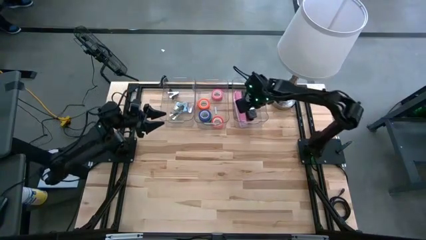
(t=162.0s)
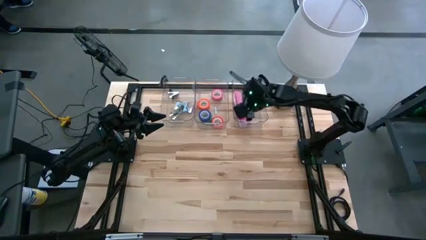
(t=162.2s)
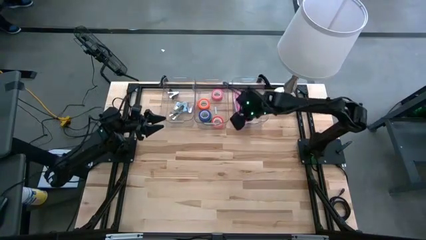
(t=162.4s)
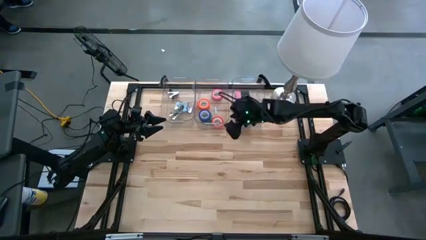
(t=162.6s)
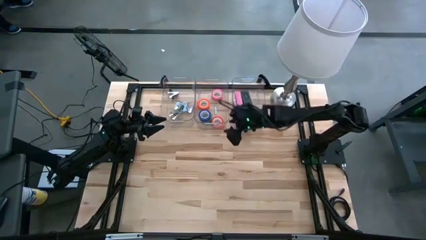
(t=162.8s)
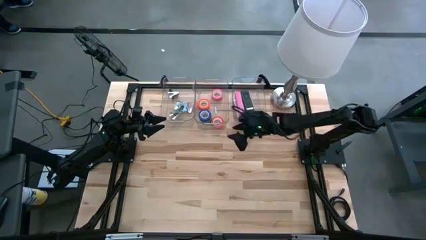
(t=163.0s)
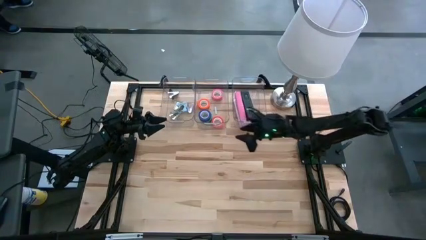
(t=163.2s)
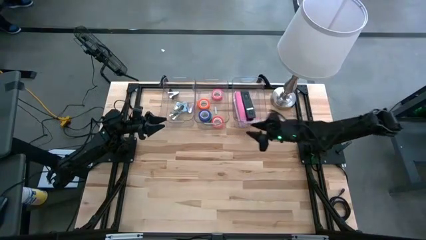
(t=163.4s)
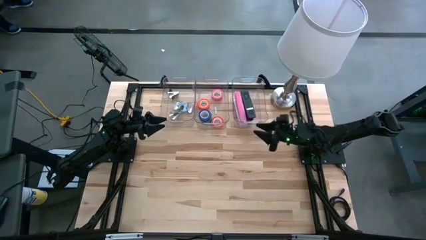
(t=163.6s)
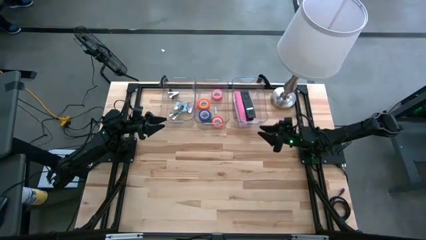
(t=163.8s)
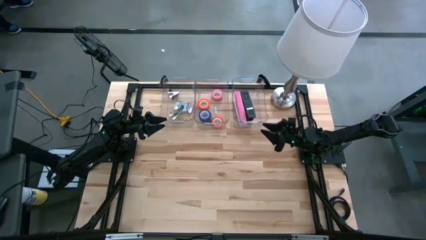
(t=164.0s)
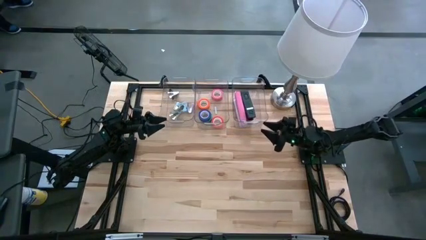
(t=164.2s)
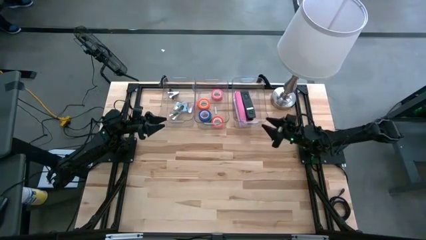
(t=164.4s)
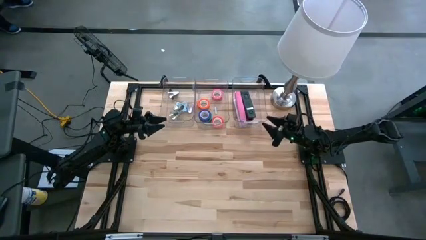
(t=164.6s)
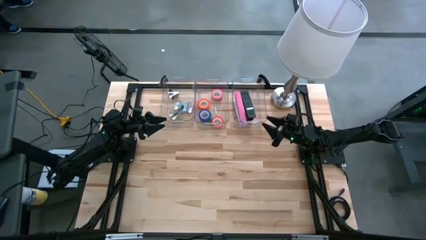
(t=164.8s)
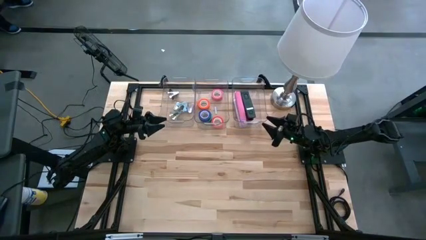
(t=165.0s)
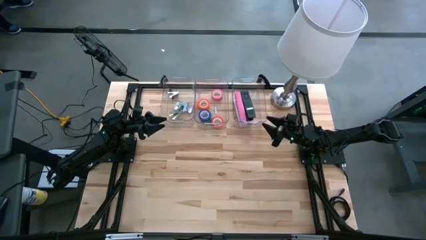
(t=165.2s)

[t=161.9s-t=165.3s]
Task: Pick and place Stapler, Stapler remover, tape
Return to Home Position

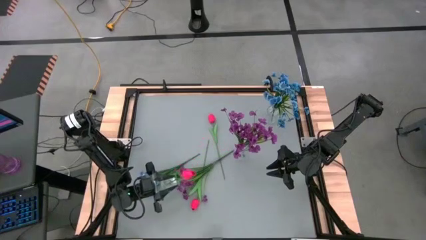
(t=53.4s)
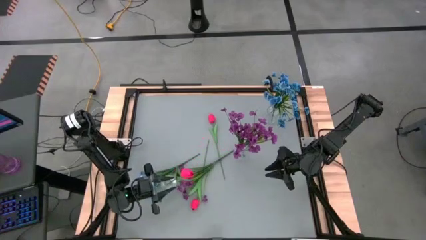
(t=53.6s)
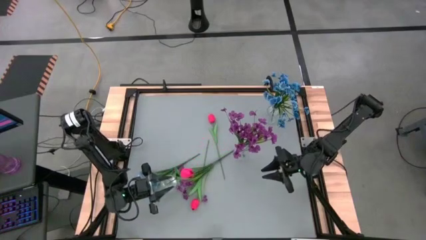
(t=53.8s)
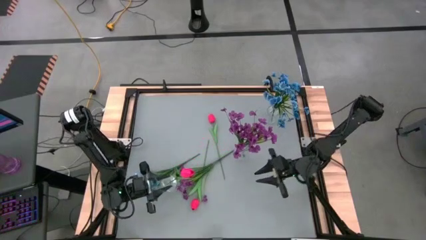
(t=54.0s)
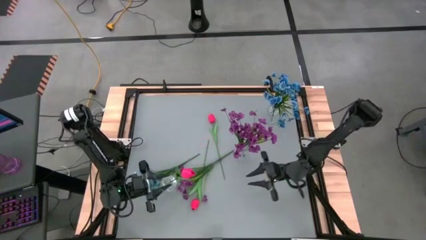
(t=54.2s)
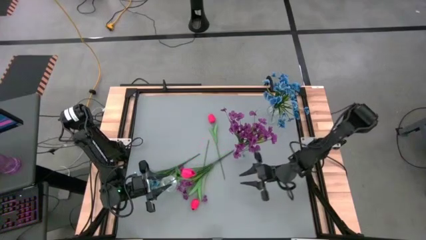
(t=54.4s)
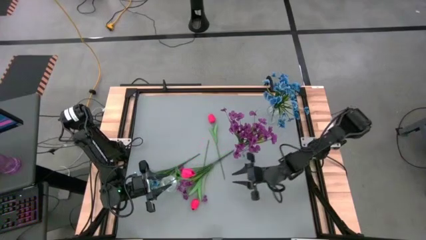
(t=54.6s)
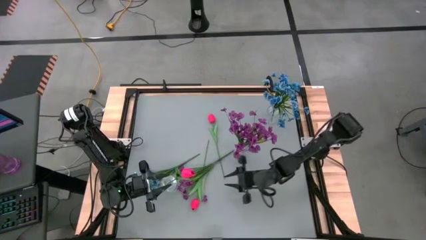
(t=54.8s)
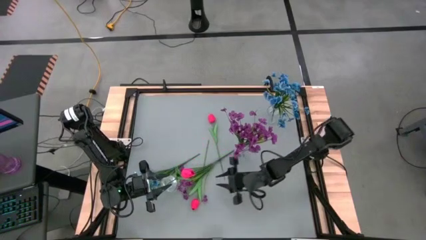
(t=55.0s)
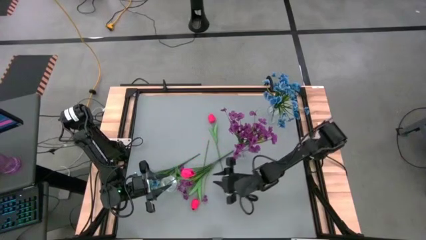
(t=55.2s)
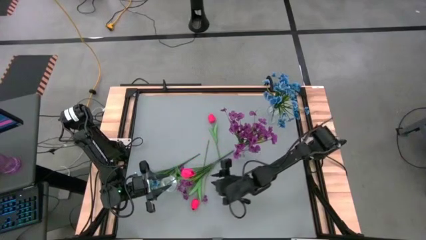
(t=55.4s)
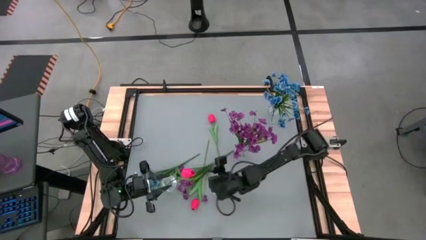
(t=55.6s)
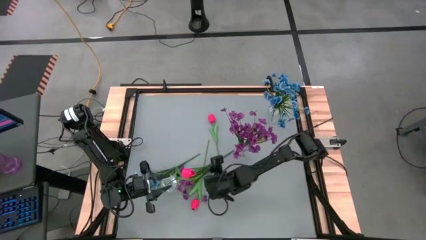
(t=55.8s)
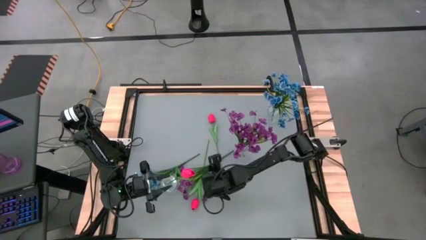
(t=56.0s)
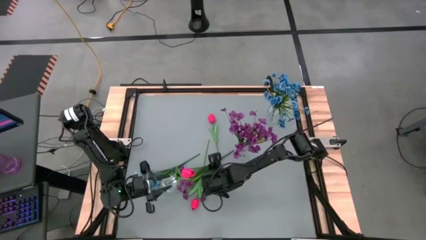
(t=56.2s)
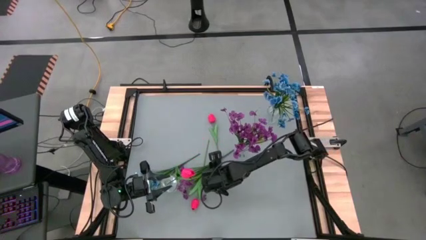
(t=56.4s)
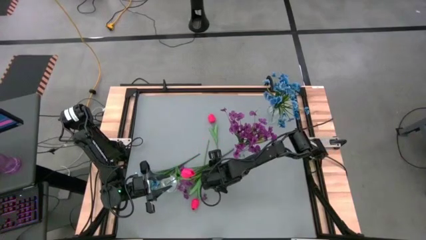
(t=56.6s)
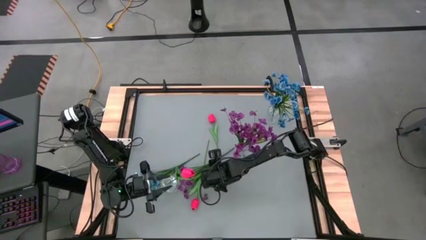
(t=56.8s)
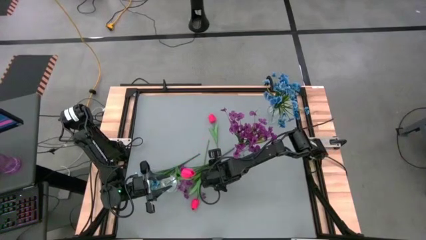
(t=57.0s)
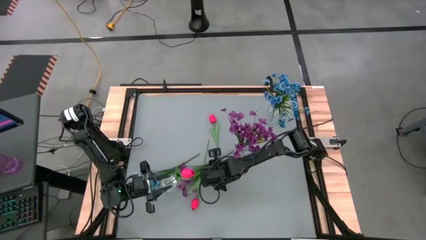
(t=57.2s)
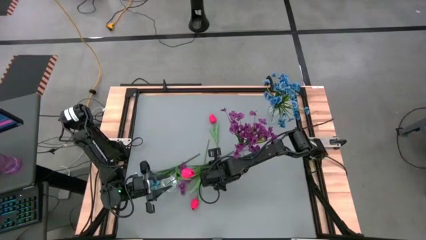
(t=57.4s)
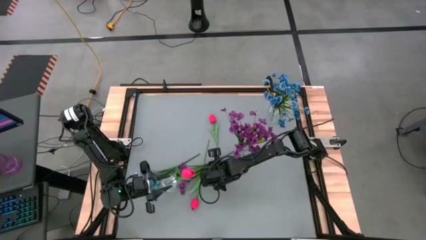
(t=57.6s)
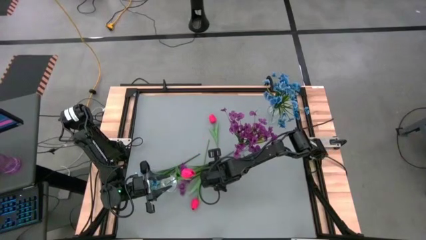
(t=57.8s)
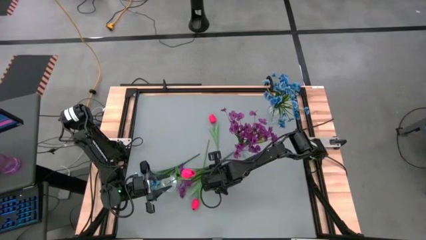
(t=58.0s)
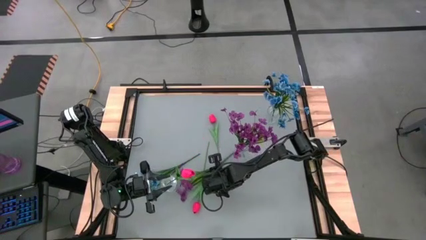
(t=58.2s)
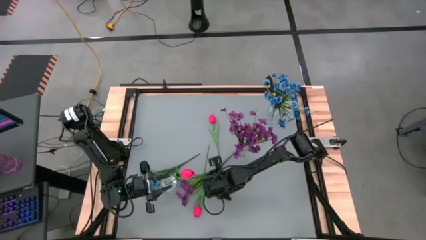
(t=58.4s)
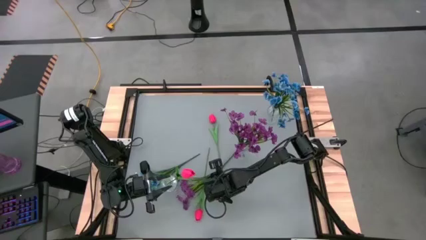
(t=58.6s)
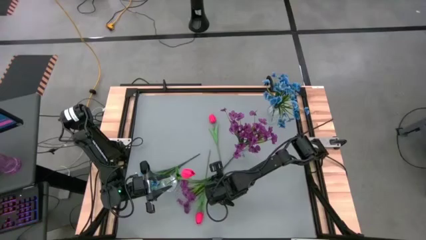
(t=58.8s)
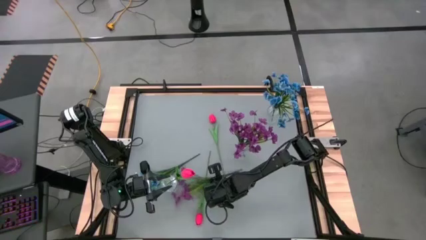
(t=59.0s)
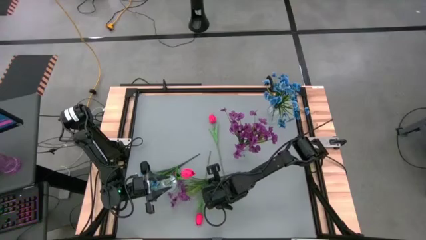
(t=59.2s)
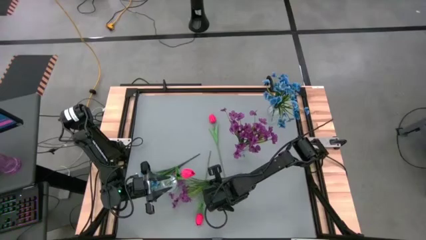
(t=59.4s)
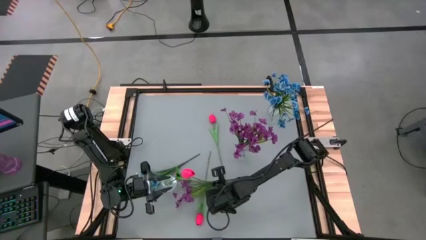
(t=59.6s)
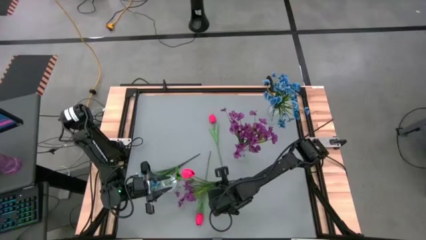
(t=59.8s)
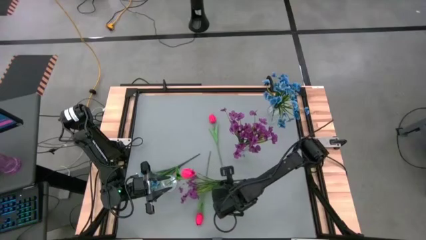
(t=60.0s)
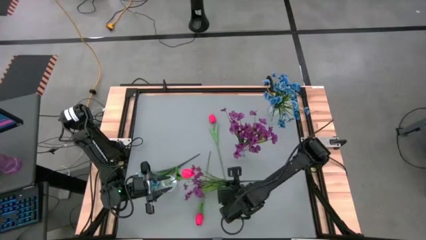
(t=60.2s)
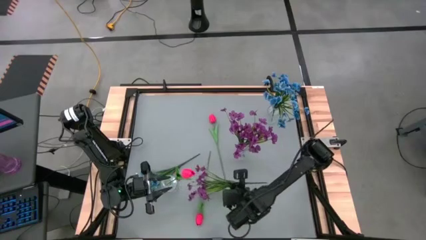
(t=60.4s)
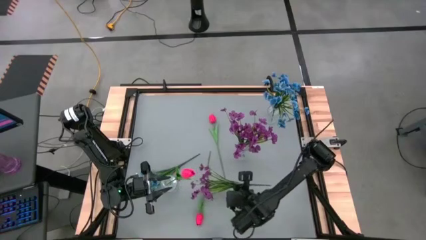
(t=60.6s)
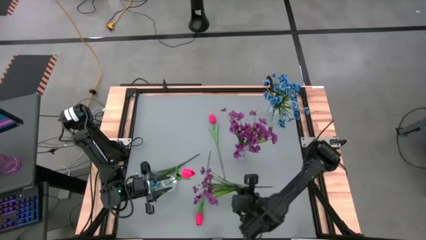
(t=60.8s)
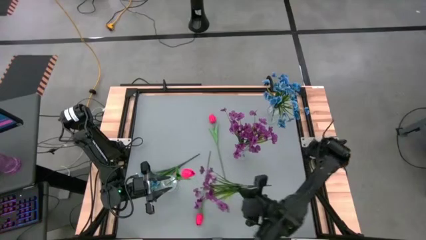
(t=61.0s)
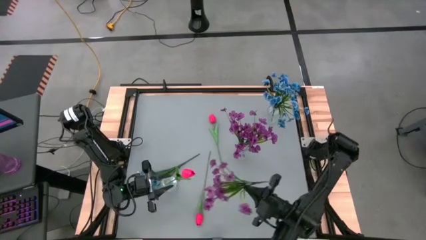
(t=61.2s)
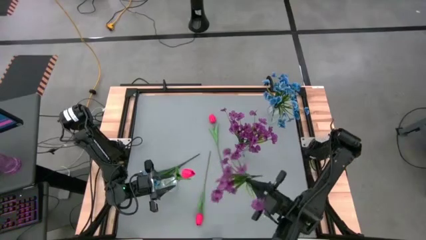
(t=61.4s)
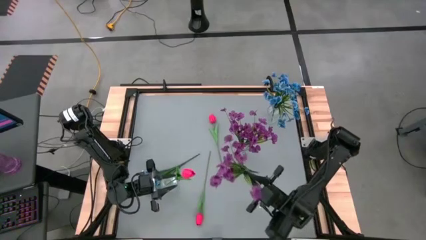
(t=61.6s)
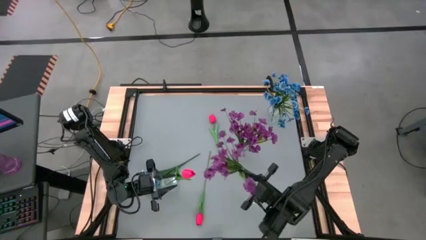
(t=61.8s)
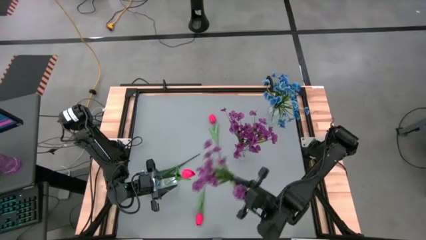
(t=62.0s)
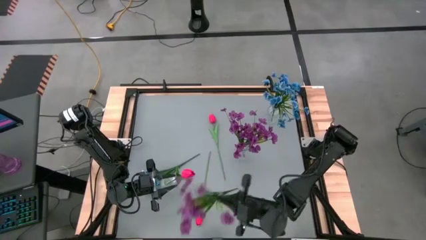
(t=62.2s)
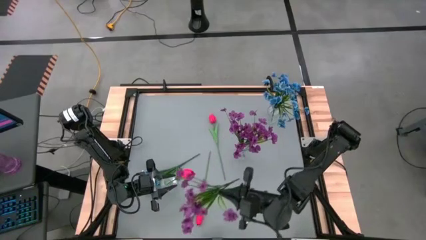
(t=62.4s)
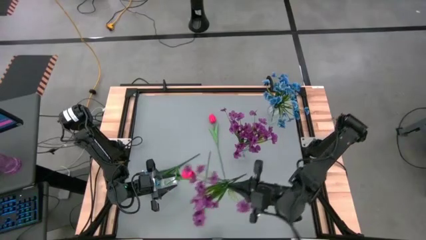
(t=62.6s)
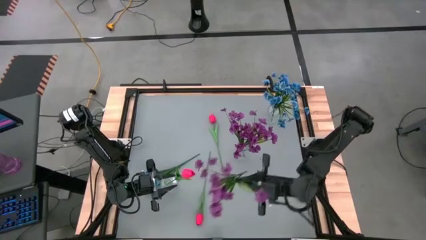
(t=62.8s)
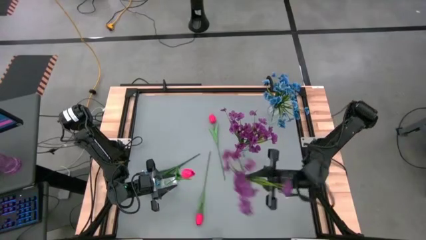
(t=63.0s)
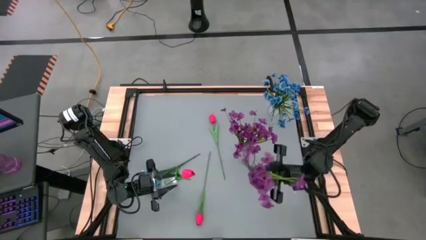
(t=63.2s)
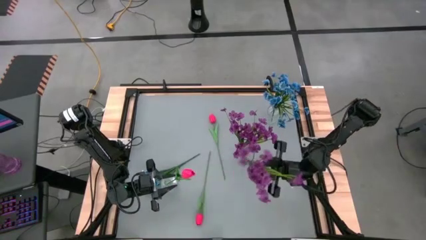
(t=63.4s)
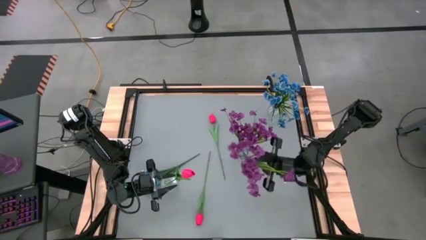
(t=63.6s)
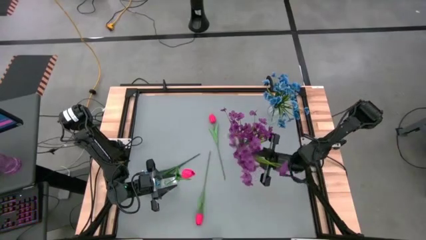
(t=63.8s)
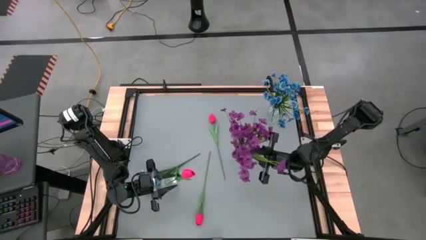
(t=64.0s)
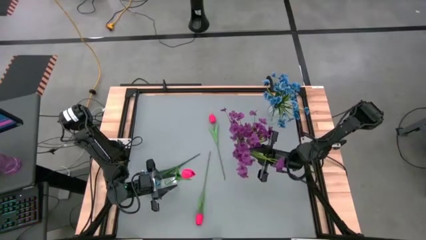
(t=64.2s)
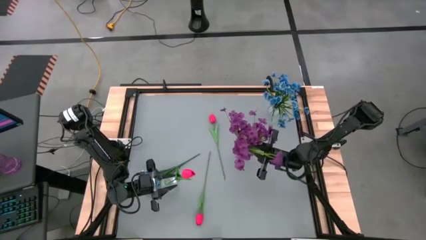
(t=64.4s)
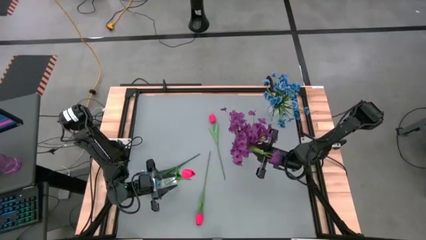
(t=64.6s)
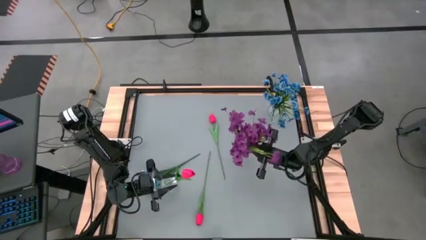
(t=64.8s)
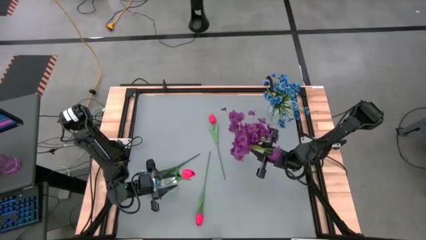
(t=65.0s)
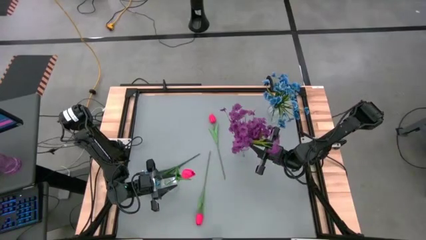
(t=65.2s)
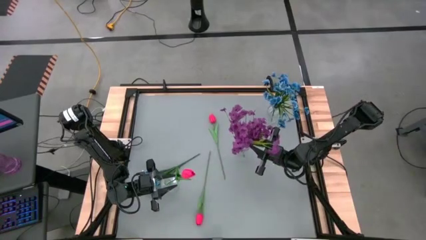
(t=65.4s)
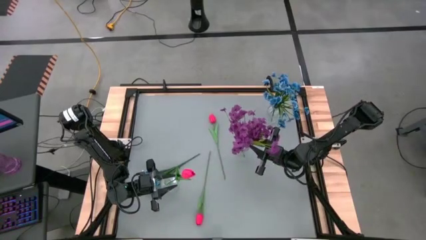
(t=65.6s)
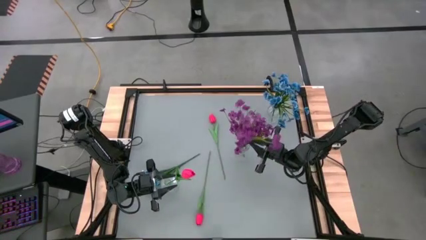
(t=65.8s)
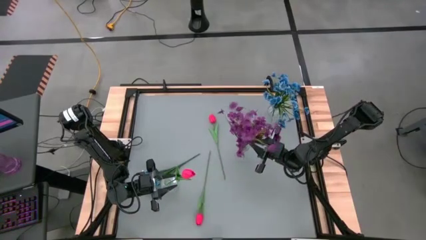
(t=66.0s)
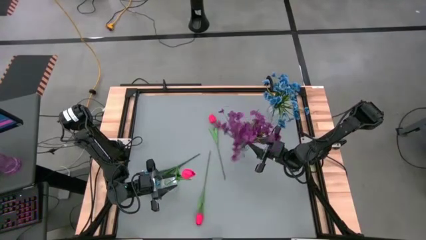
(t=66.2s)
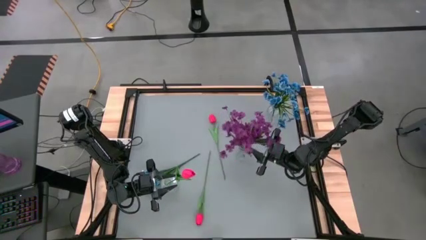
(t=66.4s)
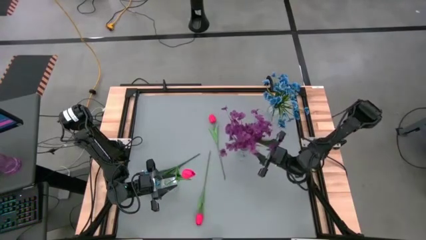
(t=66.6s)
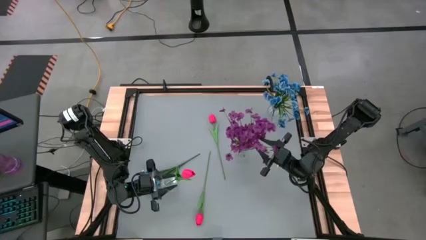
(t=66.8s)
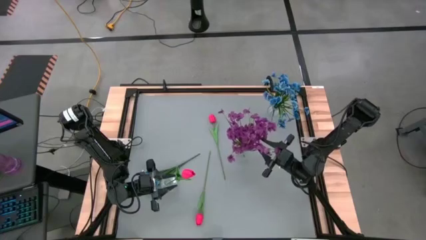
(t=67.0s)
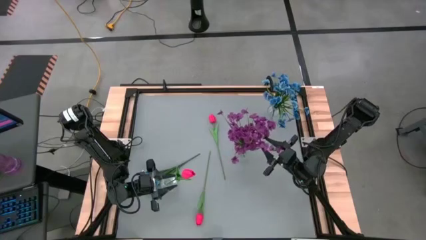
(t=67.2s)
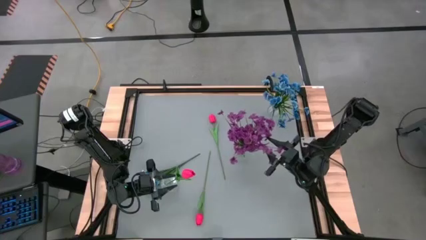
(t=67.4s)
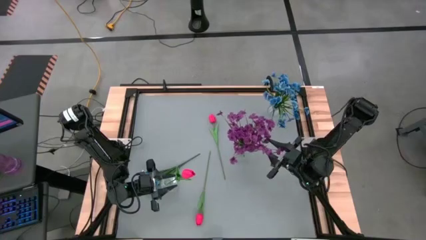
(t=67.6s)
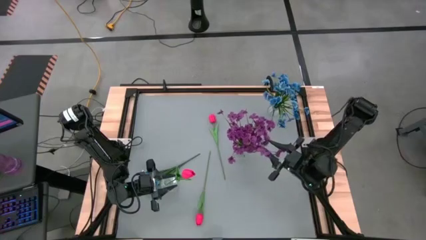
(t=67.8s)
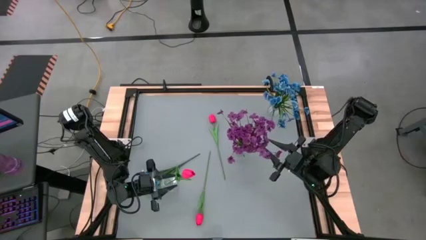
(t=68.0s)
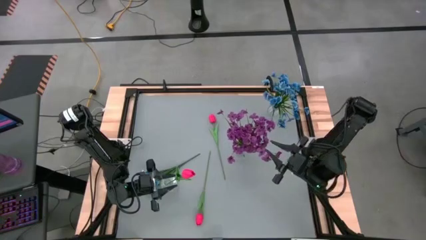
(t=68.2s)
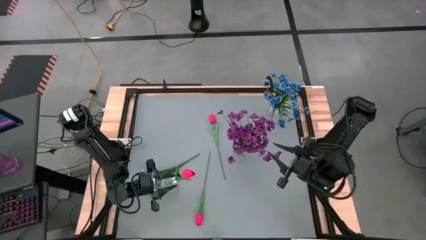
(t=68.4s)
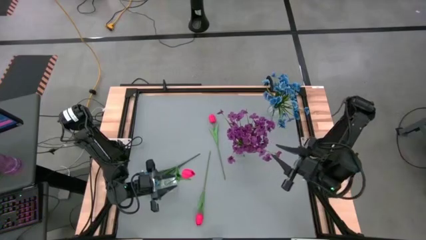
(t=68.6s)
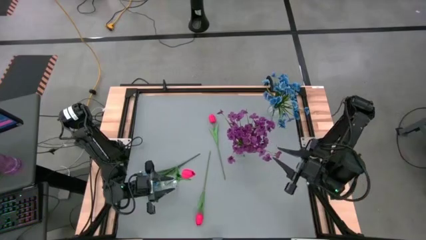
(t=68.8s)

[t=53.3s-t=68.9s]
Task: Sort flowers into vase by color
Put the violet flowers into the middle transparent vase
